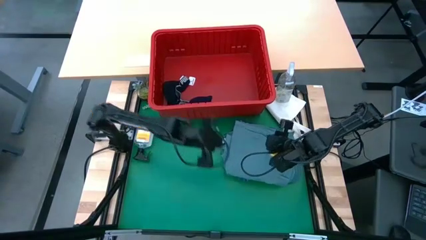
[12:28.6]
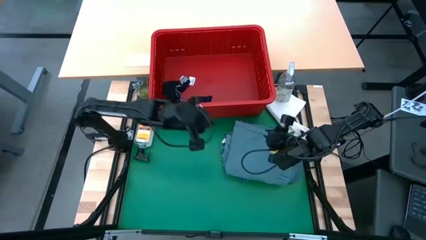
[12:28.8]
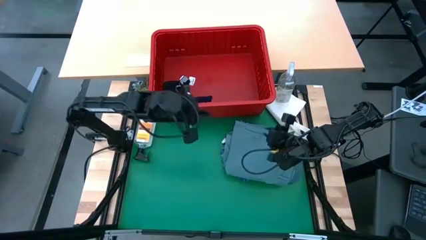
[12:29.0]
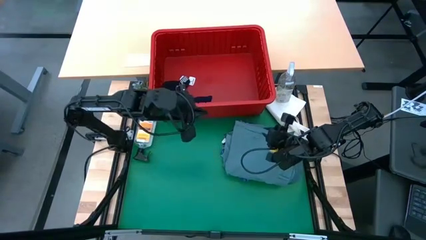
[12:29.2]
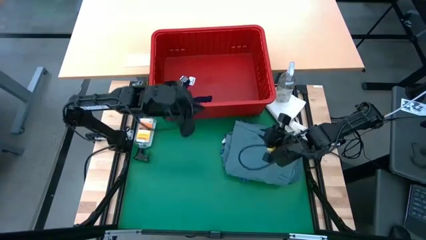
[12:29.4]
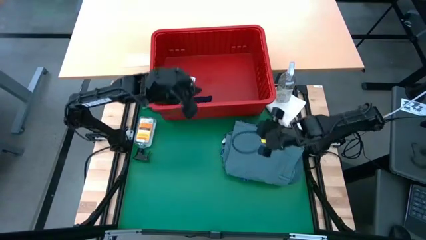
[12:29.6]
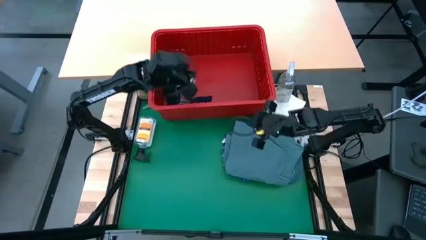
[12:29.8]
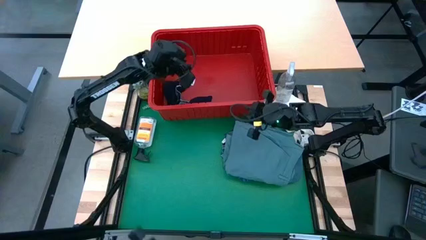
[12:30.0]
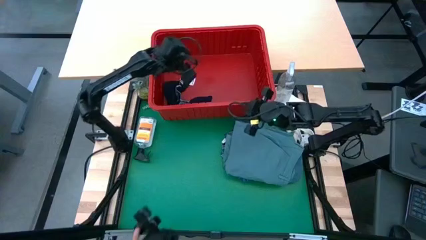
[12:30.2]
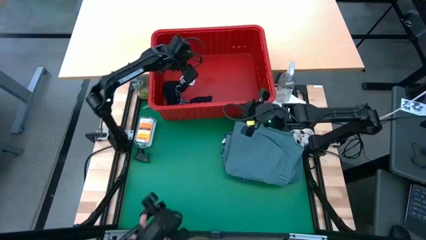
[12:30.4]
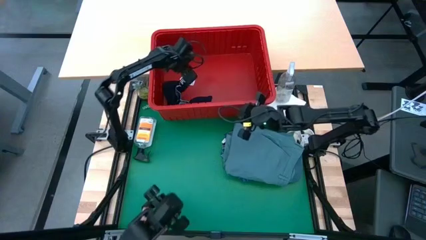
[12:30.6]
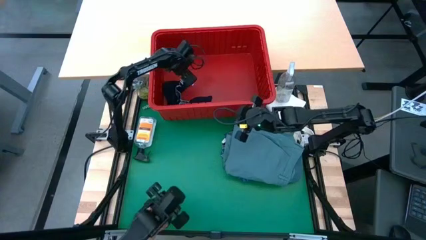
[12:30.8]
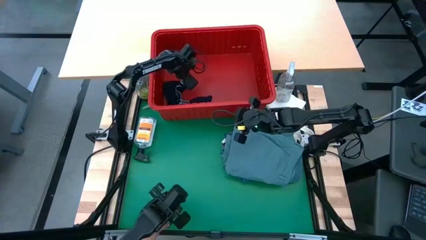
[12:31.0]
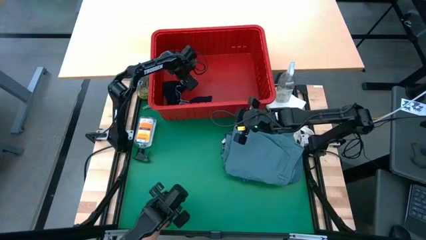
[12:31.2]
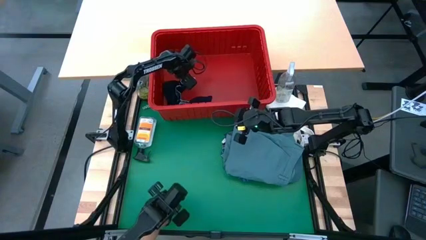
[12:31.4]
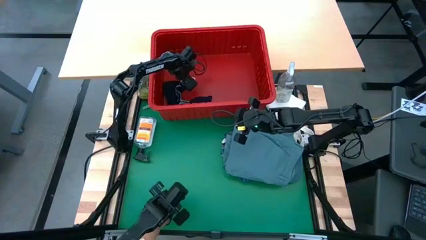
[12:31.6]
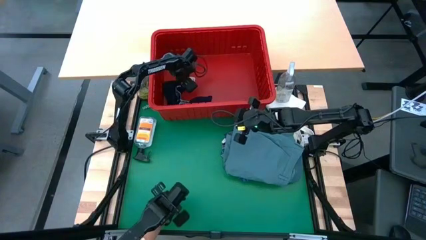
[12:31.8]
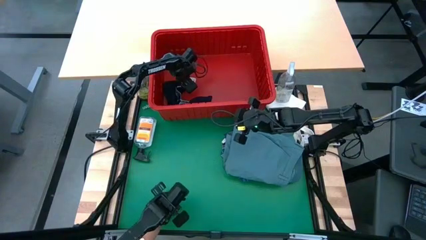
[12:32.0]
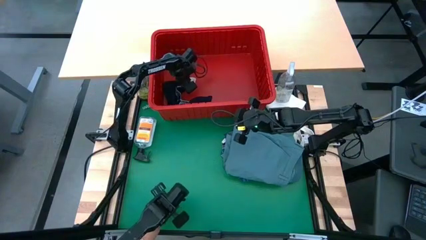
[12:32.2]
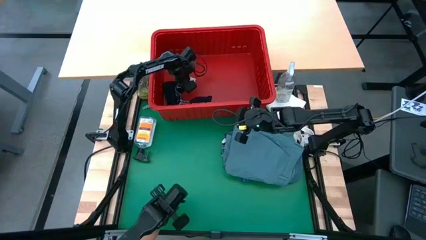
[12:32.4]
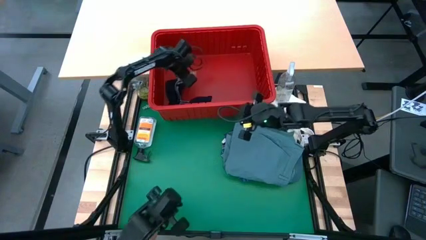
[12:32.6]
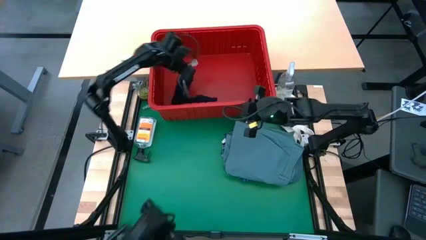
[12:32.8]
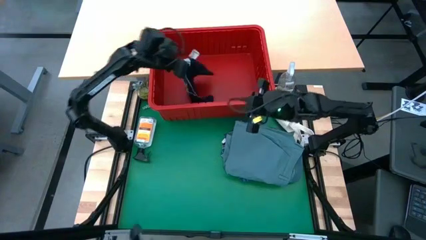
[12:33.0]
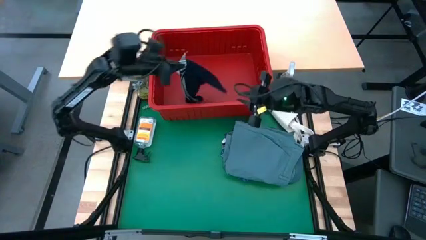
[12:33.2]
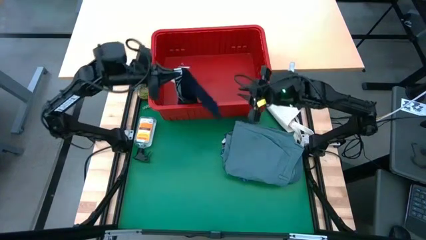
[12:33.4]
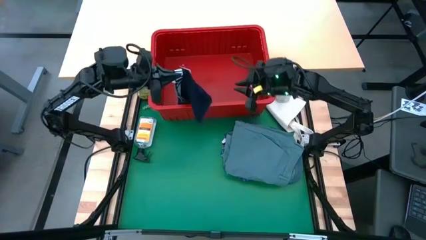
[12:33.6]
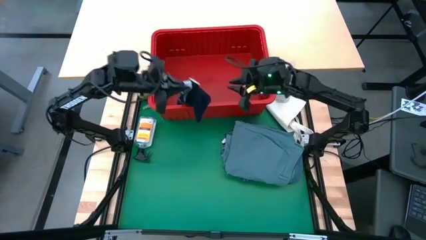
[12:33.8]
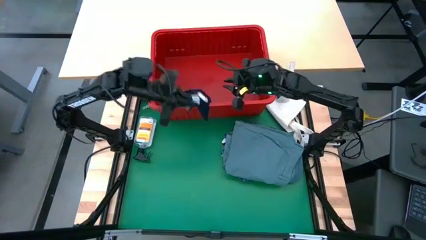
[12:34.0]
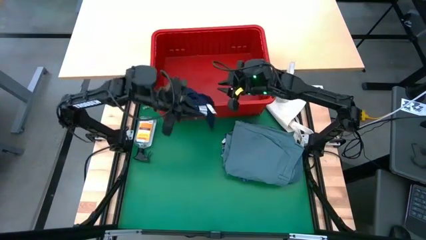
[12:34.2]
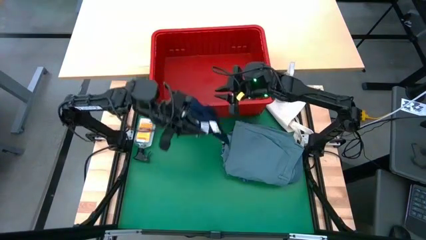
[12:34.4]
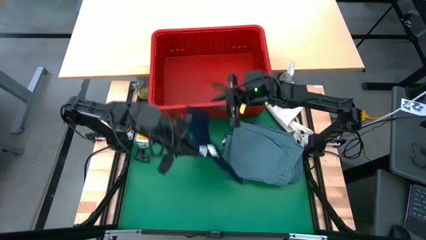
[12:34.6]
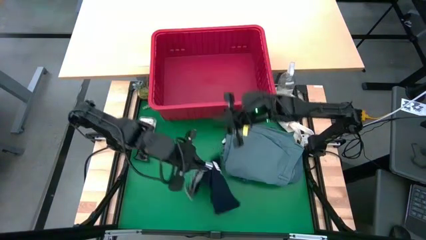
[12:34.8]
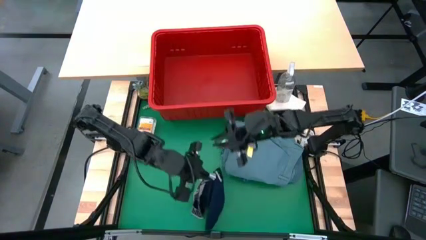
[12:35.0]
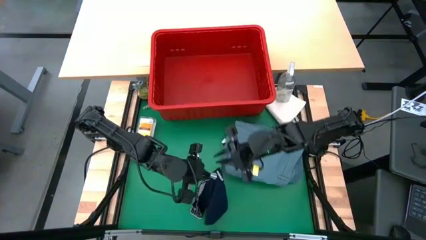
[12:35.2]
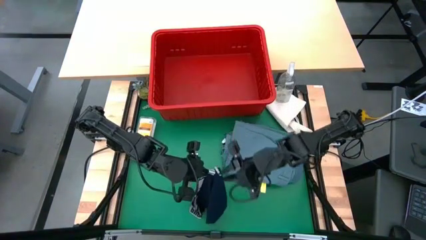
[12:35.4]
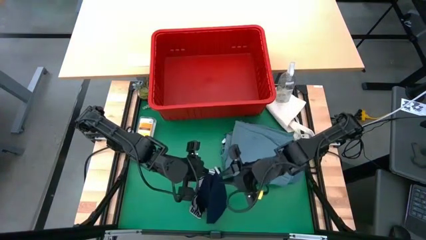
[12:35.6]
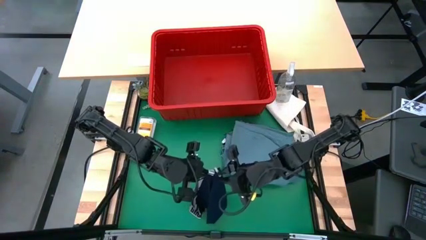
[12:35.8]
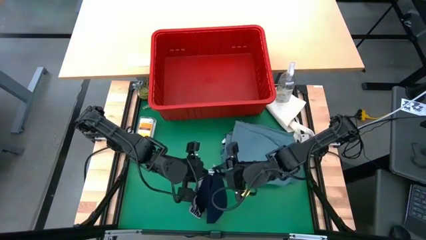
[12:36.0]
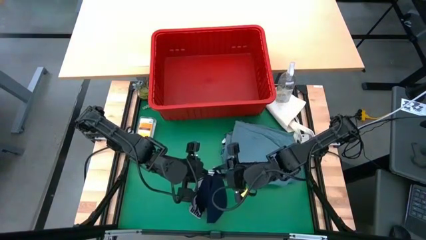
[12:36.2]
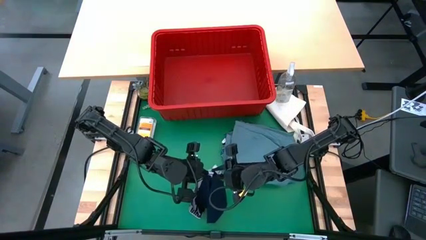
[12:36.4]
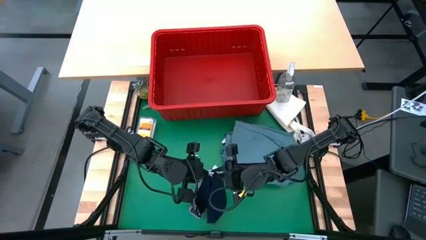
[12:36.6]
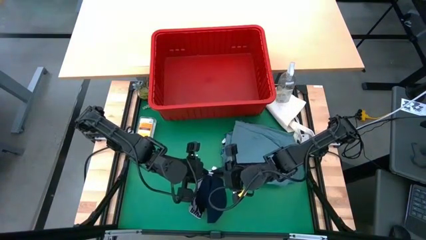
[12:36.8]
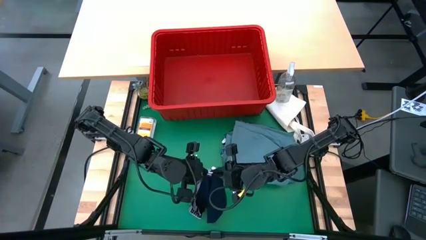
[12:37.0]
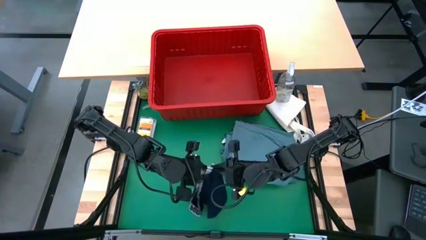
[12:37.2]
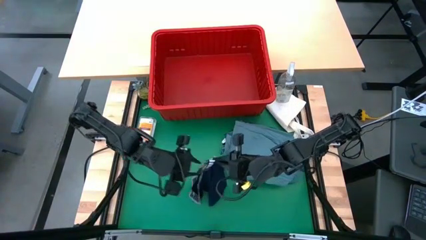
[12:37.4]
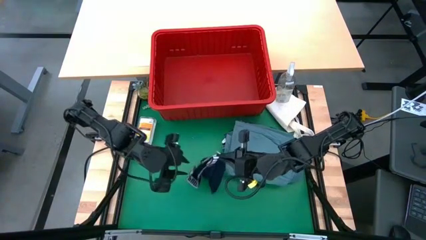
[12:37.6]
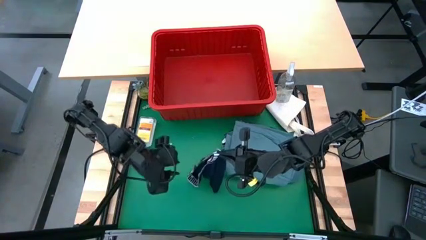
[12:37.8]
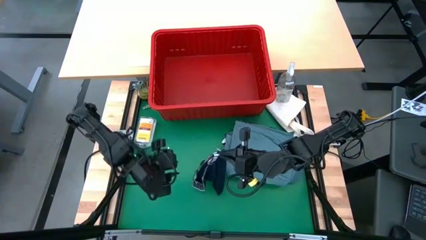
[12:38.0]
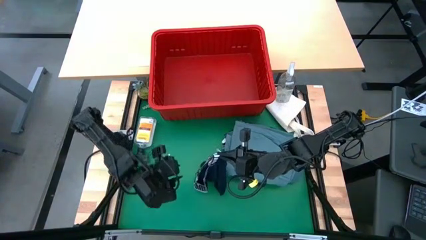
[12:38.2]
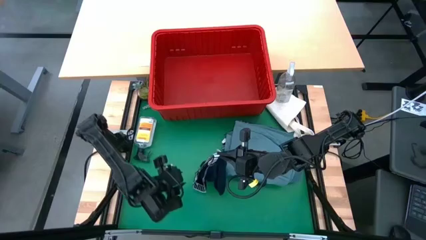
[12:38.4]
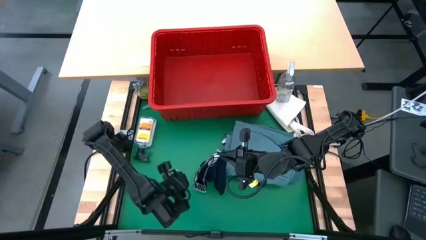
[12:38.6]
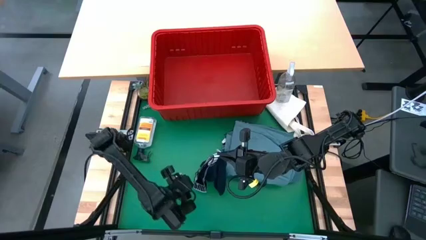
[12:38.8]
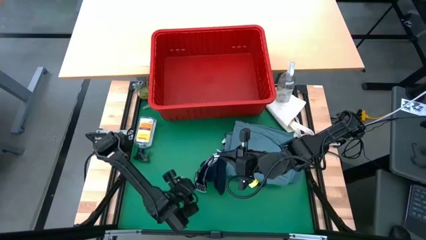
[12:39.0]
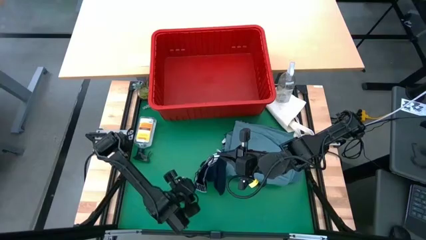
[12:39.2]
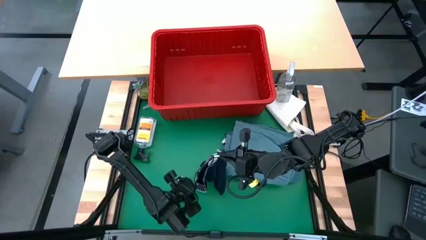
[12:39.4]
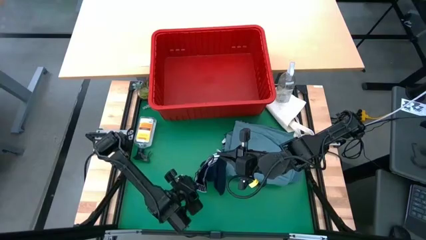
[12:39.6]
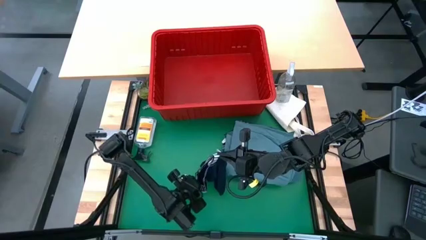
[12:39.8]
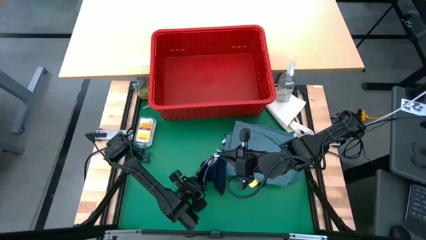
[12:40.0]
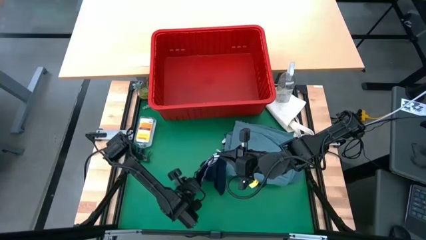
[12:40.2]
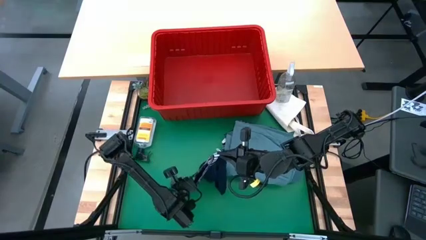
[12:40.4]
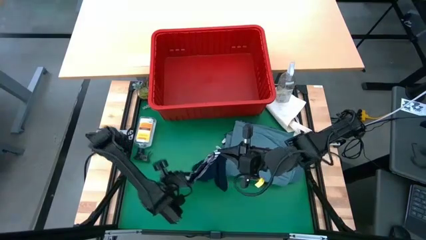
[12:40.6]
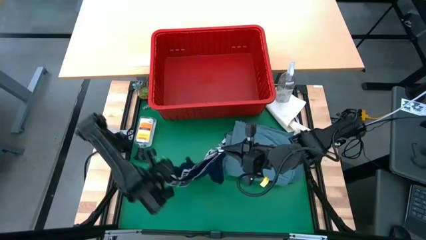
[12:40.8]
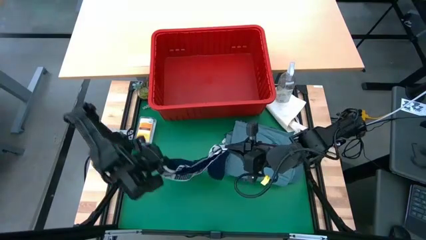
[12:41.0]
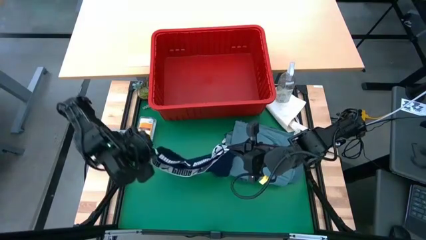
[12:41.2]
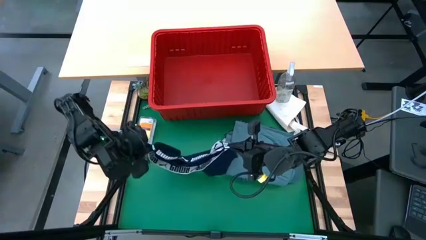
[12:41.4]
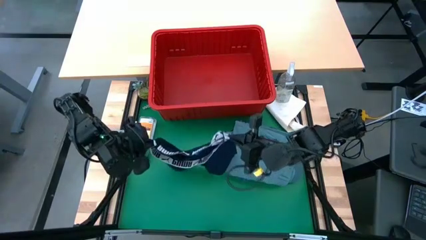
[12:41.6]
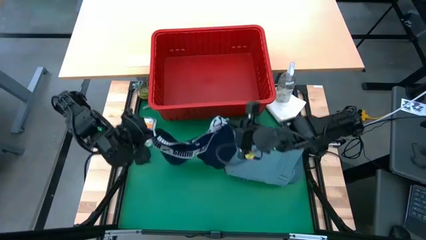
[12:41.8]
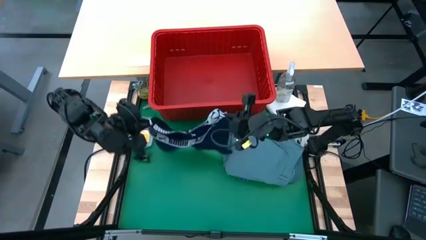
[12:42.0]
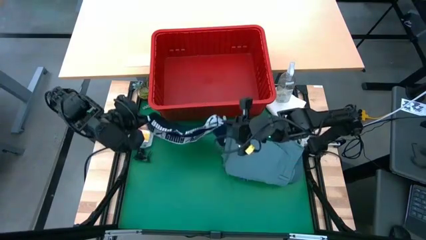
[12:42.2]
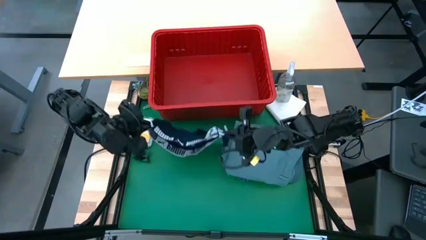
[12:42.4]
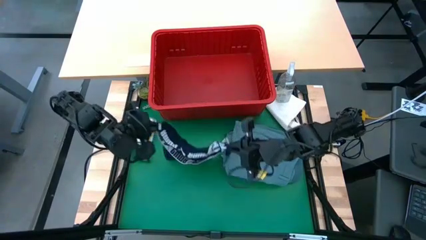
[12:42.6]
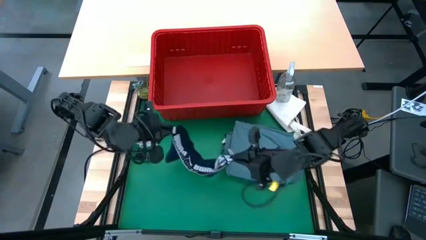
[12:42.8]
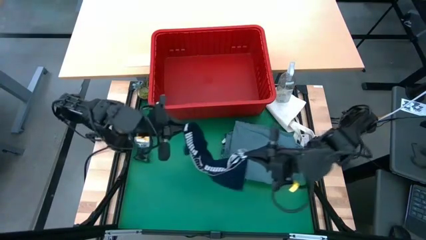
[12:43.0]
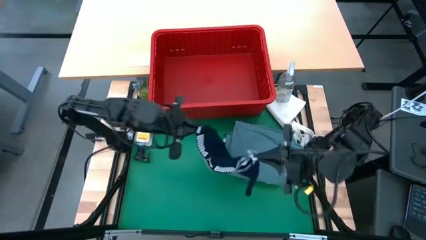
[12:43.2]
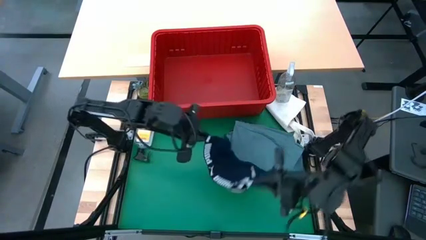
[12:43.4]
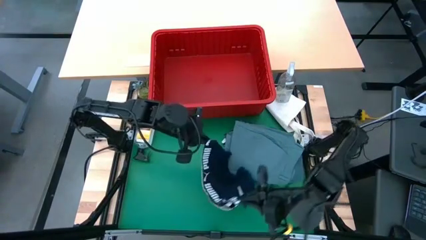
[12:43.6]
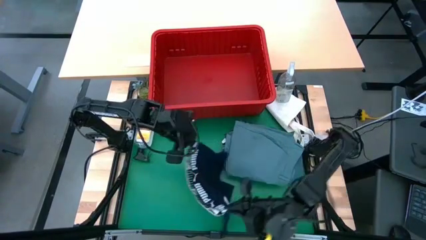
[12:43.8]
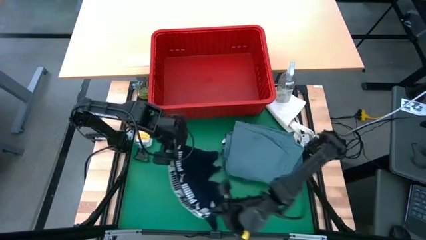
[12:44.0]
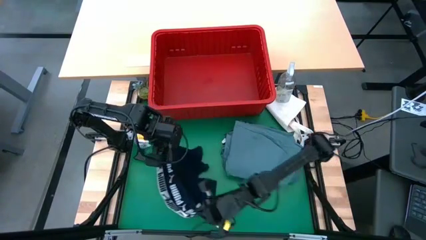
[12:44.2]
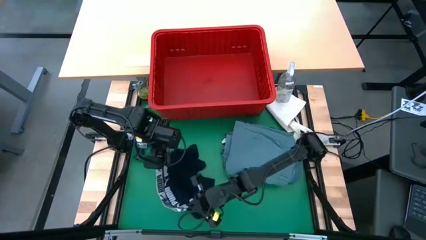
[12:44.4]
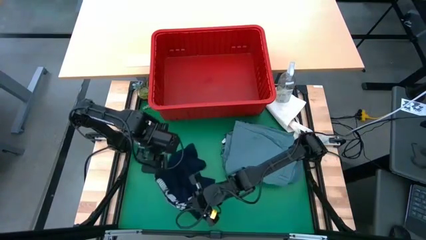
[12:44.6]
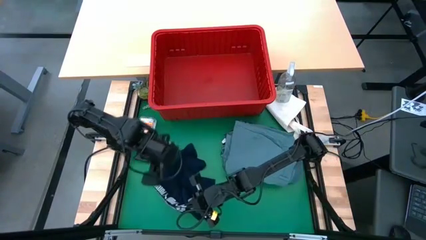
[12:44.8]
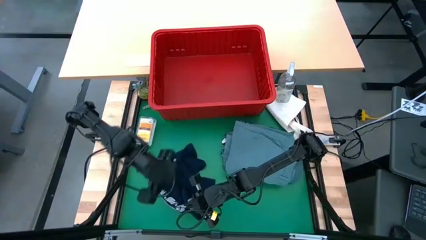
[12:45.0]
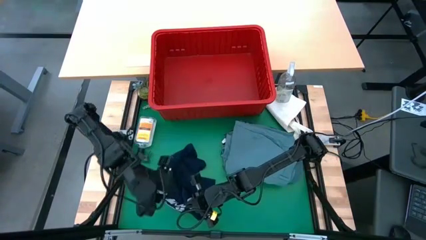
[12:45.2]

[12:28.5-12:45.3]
Task: Fold Laundry from Bin
Fold the dark blue underwear shorts
